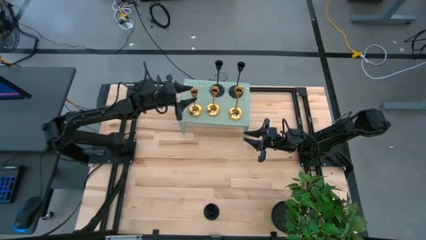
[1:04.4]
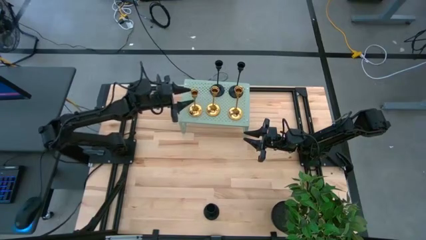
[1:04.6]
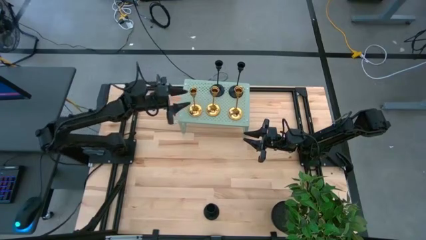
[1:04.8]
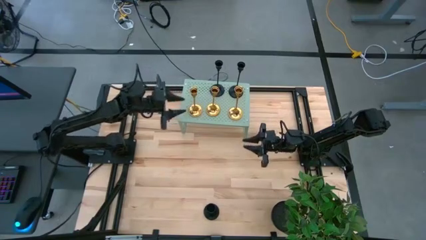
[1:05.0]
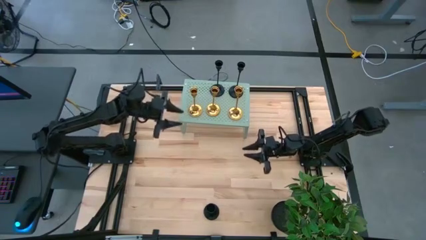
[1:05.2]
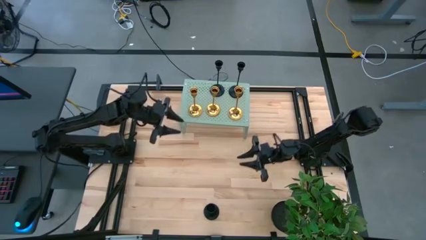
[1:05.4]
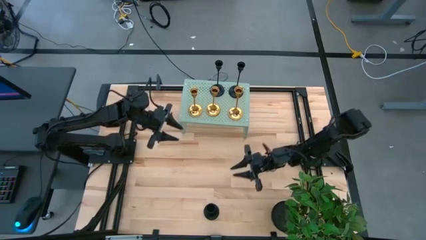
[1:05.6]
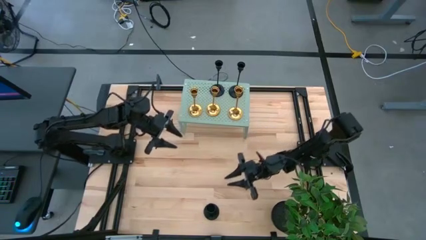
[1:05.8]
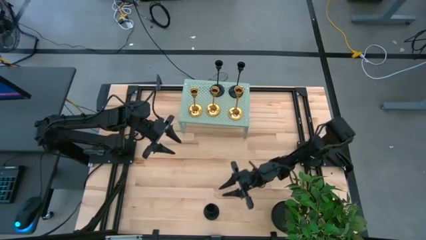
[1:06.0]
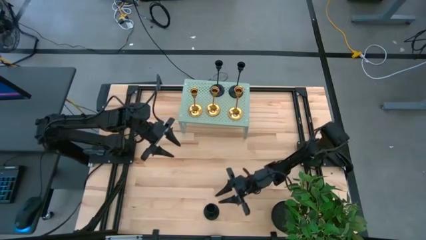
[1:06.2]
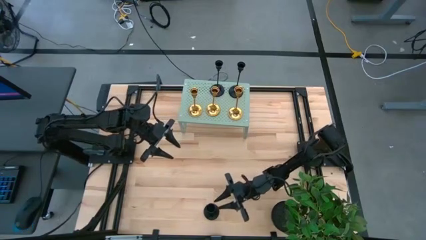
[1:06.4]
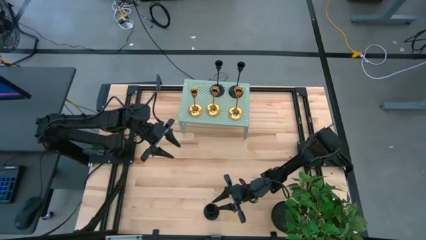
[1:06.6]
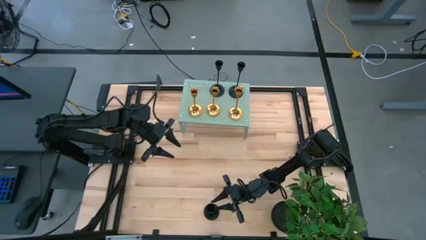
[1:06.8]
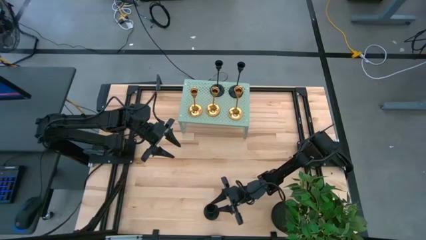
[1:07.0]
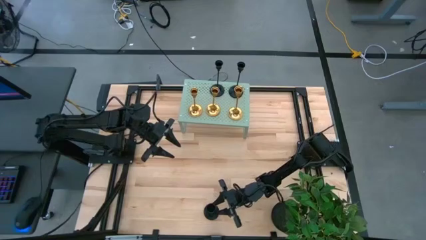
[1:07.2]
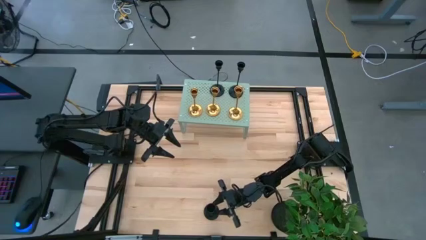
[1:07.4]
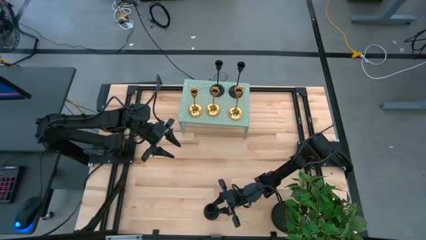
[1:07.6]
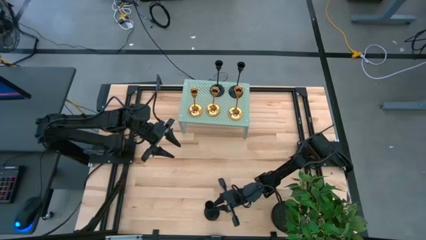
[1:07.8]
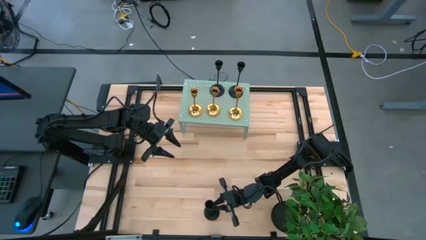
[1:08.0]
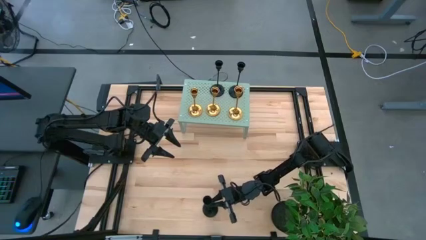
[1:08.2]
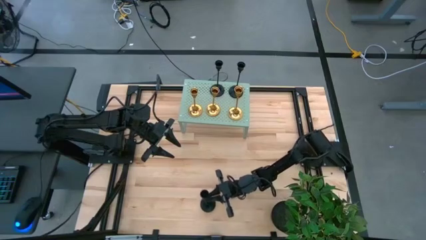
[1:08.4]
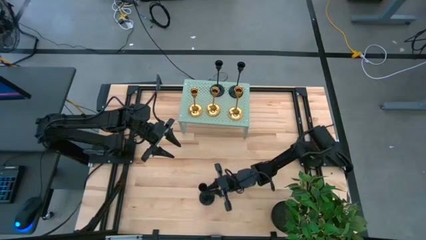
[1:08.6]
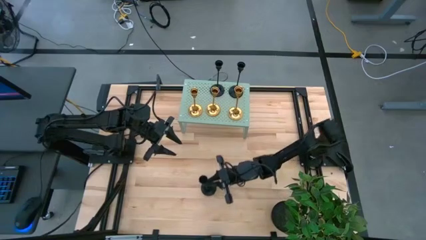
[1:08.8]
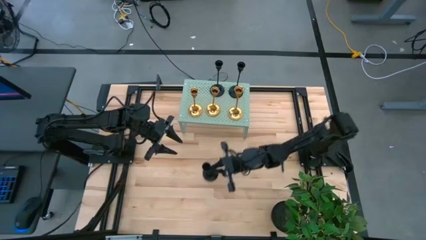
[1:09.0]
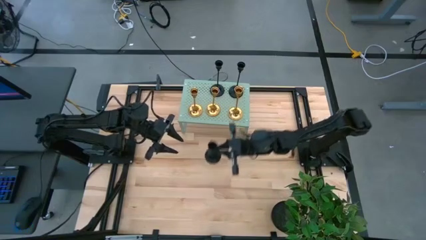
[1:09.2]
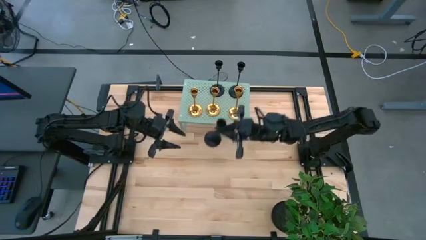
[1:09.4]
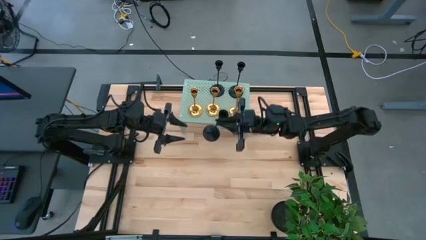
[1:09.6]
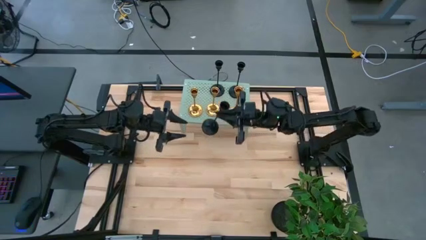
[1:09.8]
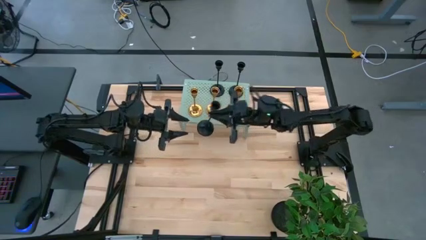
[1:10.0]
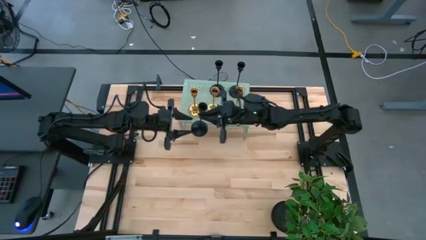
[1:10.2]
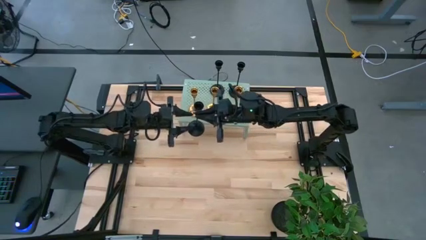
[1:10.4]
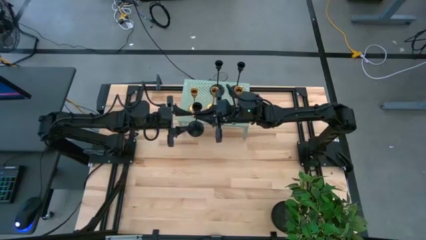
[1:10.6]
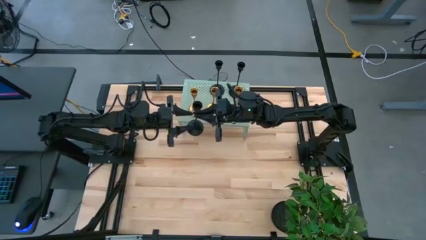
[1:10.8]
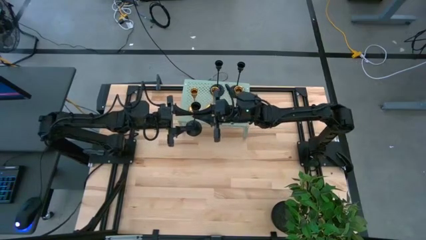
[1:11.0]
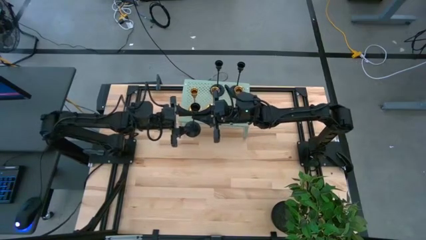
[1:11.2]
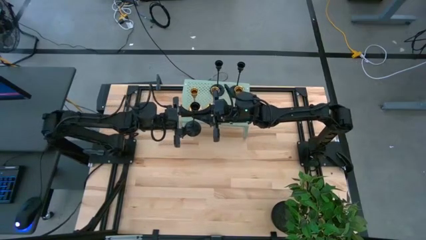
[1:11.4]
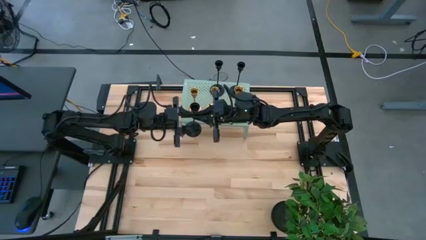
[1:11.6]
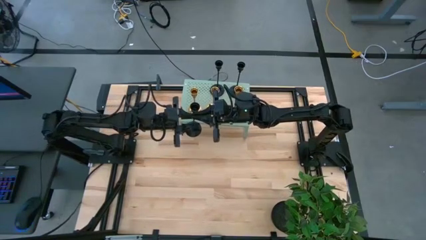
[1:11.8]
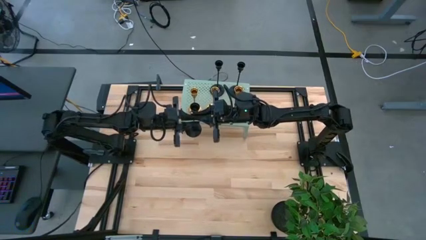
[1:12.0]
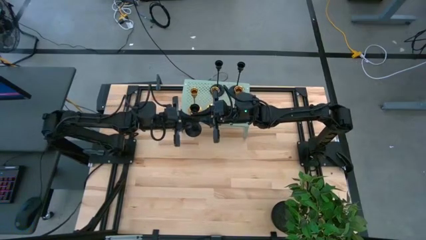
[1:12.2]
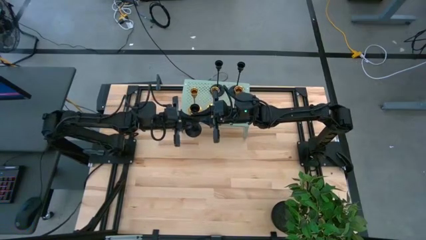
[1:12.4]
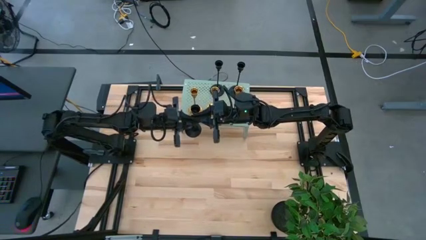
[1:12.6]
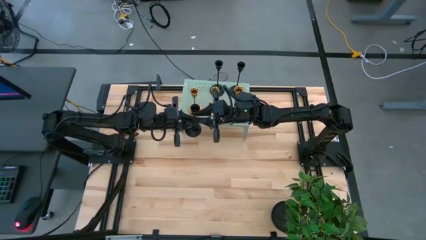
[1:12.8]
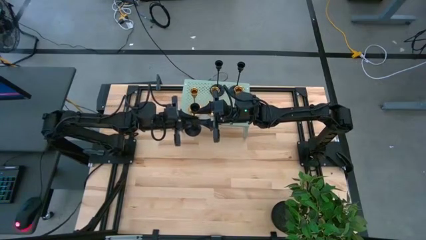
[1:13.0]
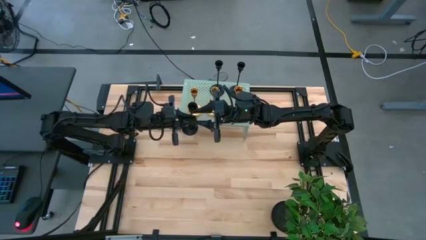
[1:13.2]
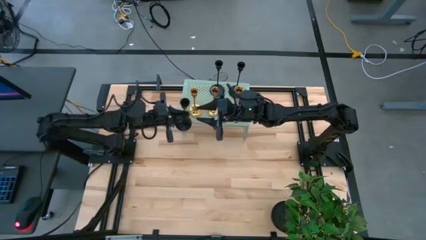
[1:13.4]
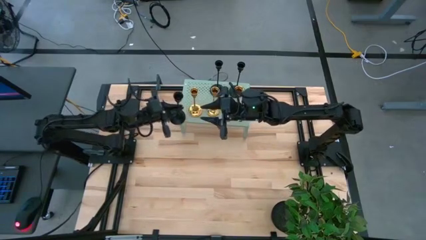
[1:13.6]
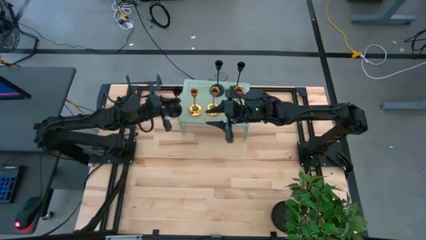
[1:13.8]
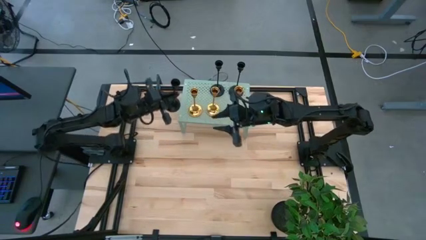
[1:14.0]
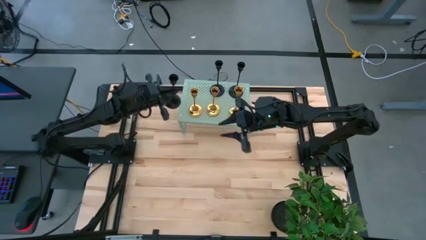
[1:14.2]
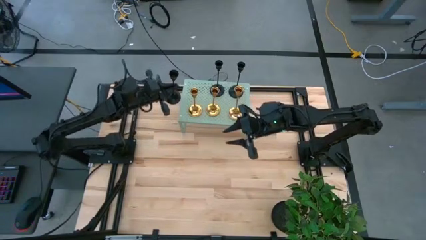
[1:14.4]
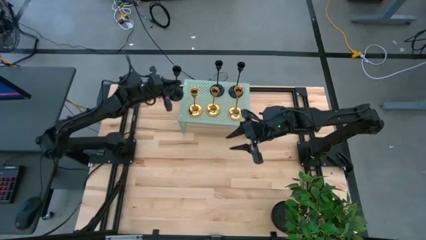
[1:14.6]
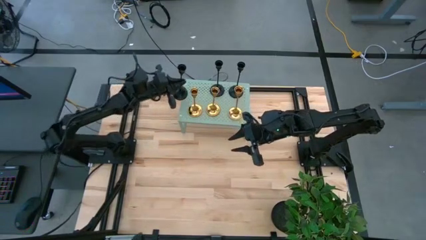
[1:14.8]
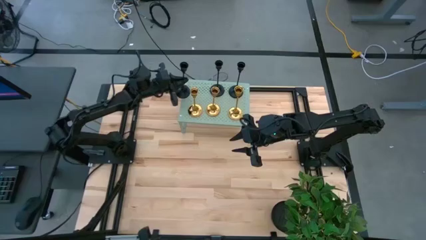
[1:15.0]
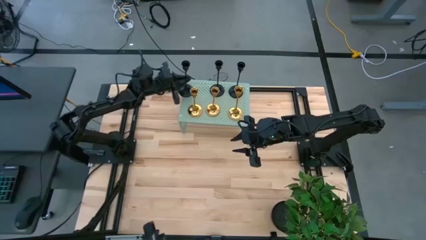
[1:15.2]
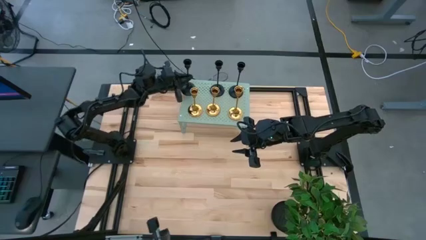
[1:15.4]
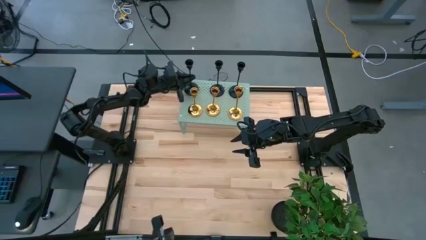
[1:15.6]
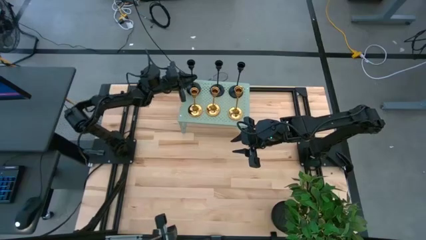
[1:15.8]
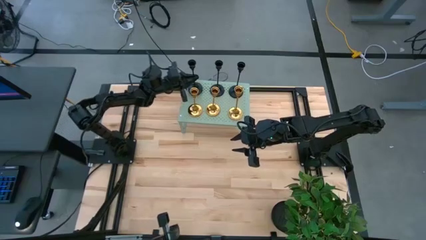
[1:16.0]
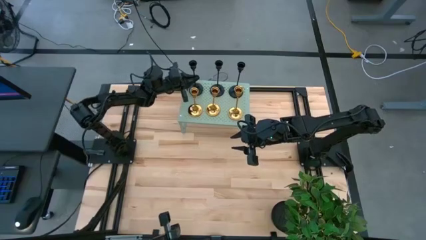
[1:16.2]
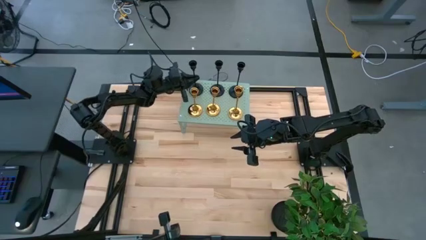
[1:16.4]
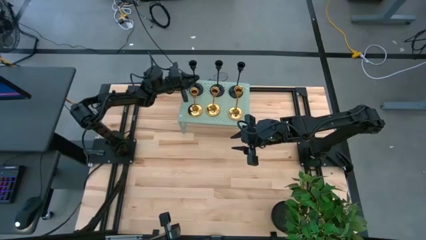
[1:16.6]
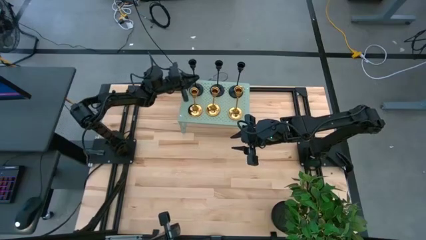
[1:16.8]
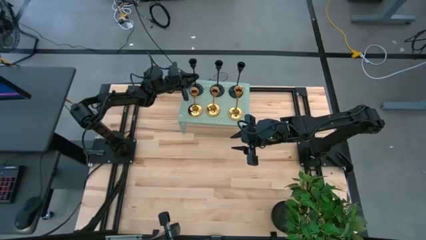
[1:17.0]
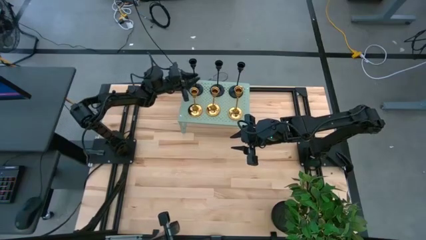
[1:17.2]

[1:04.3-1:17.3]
Task: Pick & Place candle stick holders
Put the black candle holder on the shelf aligned with the other black candle holders

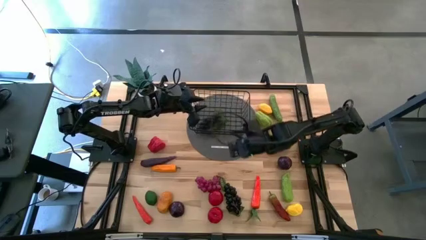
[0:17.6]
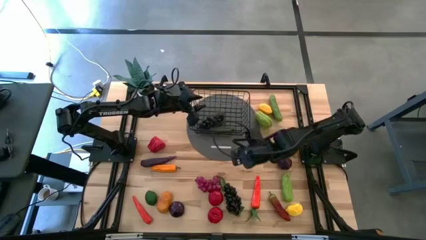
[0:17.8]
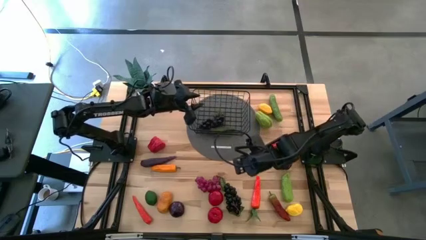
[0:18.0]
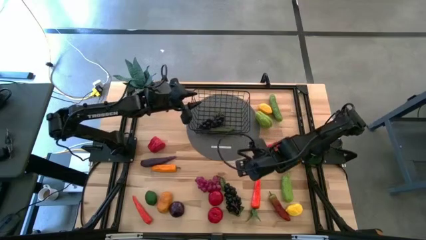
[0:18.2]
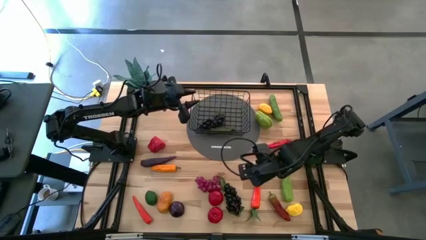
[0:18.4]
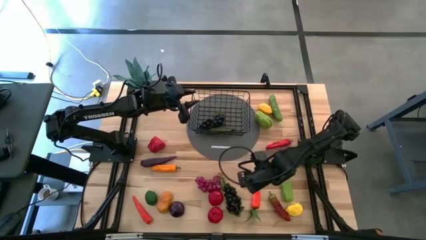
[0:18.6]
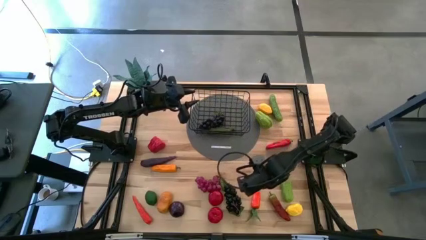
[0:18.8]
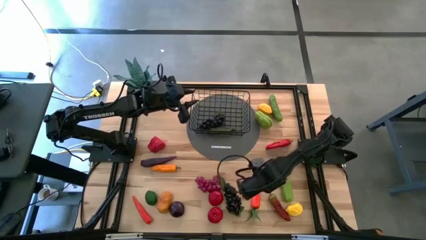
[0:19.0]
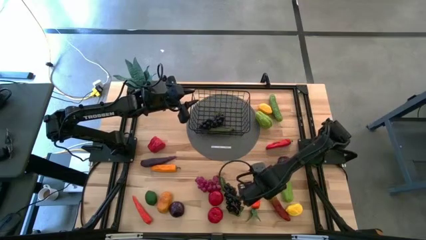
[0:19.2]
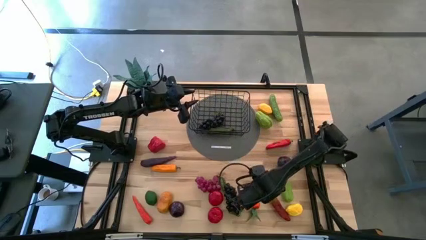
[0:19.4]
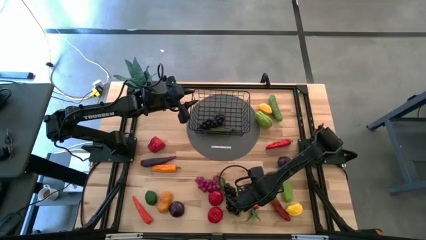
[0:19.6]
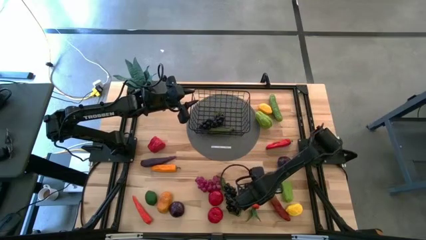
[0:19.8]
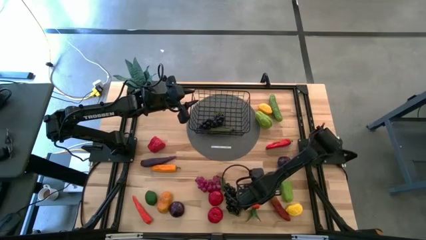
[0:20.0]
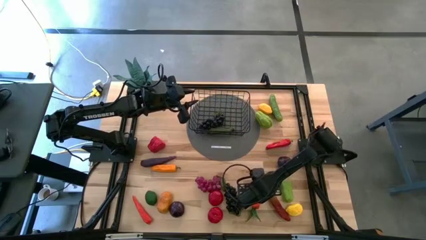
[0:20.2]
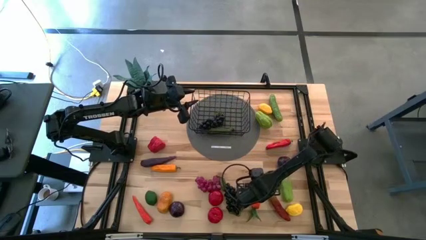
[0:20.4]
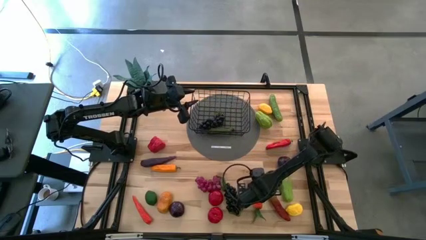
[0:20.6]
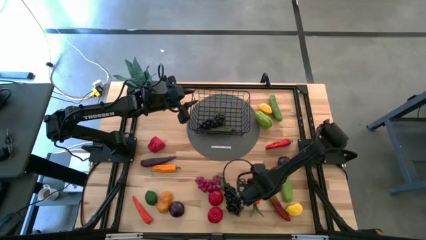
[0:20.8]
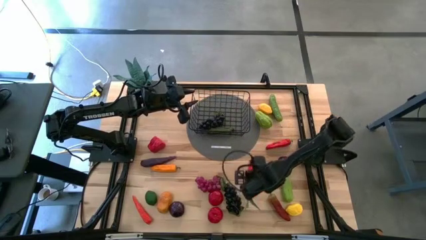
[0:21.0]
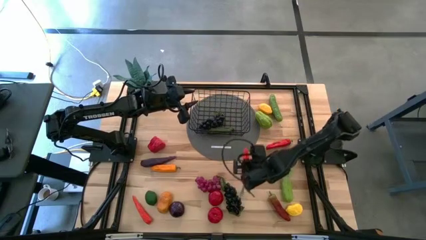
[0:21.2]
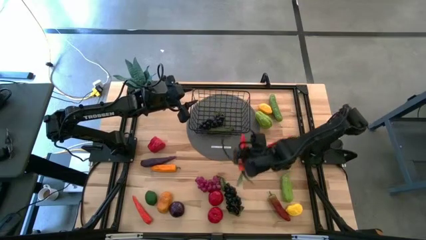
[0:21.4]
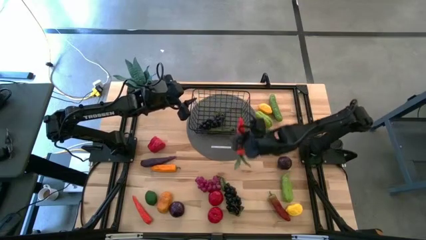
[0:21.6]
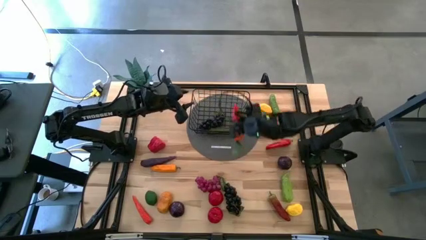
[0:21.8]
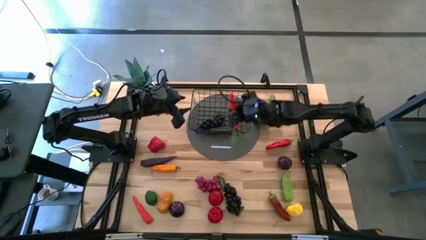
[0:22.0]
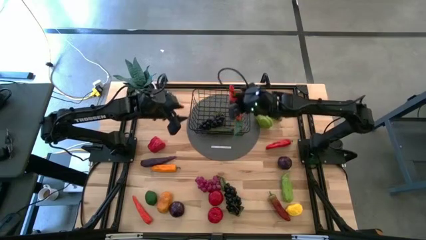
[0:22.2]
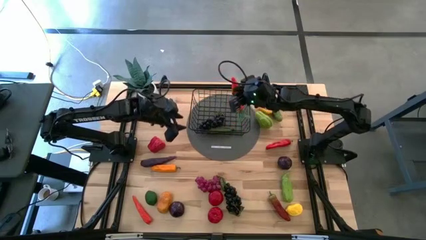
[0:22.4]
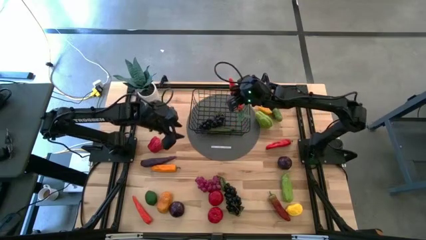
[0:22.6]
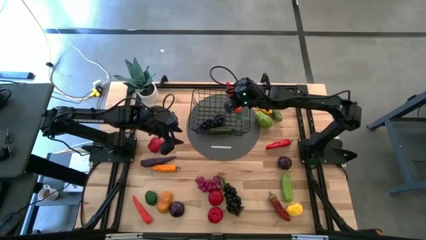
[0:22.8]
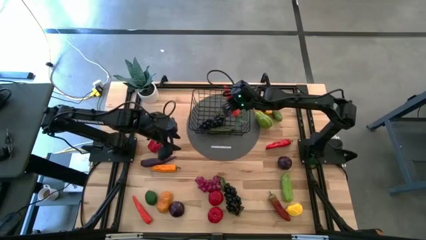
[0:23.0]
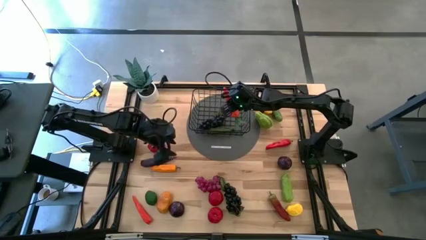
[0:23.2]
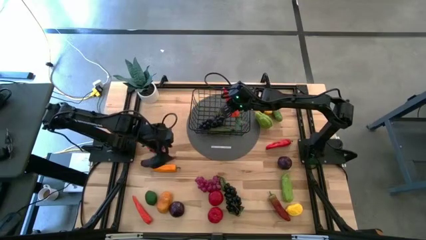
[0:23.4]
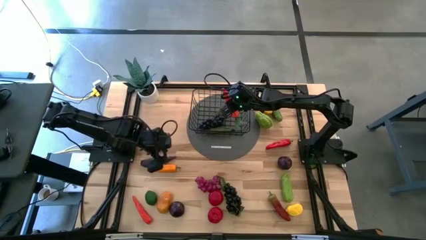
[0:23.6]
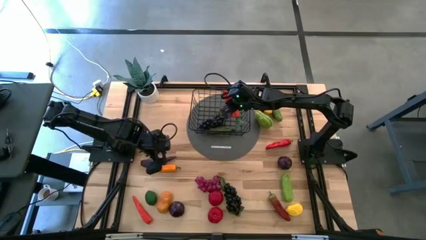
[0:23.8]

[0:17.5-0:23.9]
Task: Build produce basket
Put the right orange carrot into the wire basket
